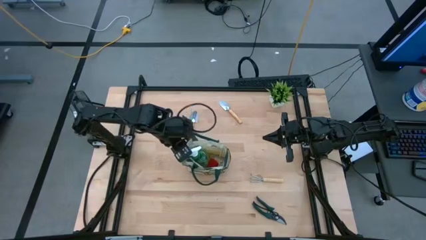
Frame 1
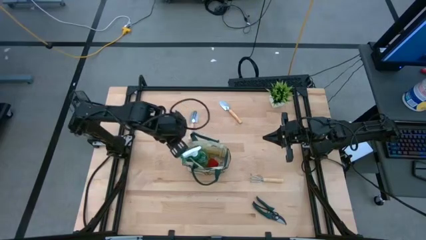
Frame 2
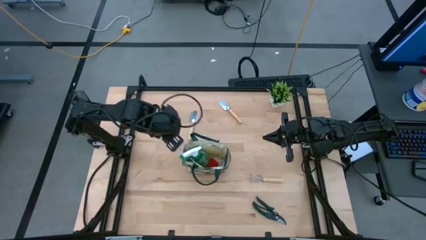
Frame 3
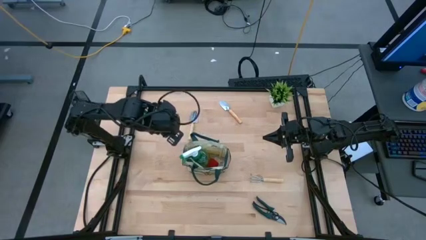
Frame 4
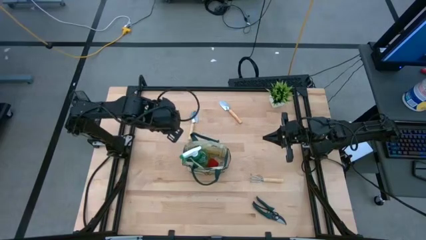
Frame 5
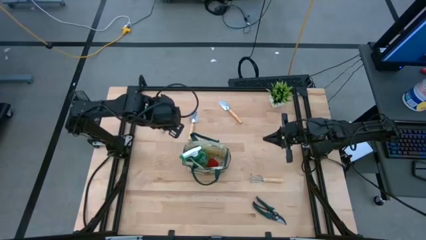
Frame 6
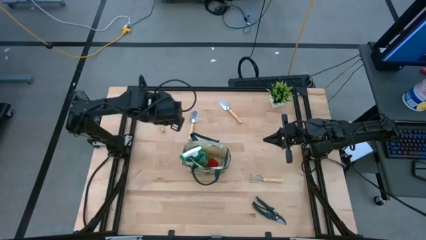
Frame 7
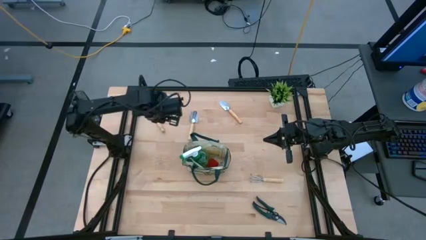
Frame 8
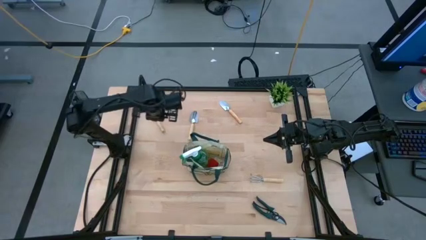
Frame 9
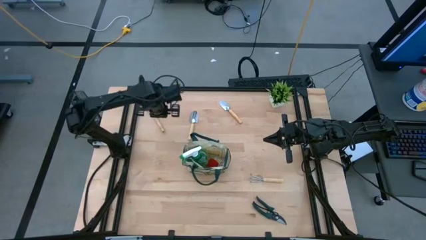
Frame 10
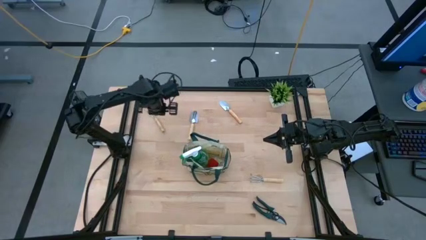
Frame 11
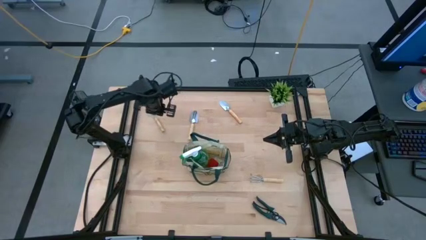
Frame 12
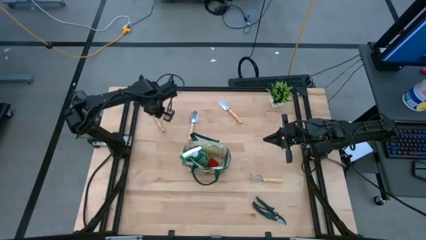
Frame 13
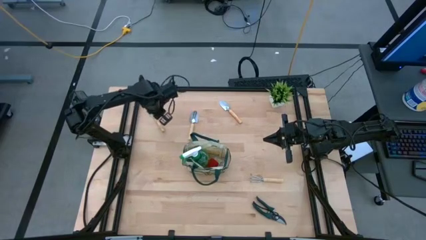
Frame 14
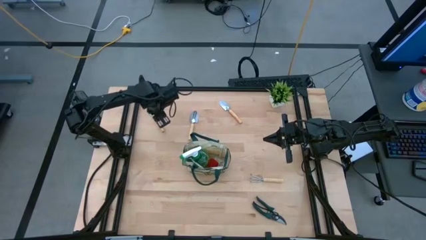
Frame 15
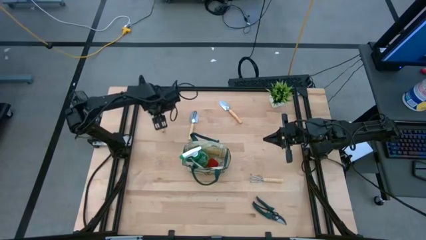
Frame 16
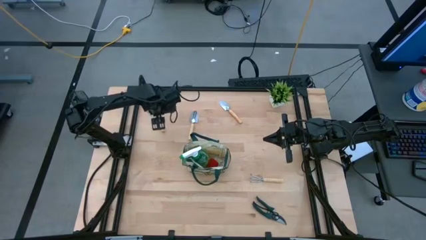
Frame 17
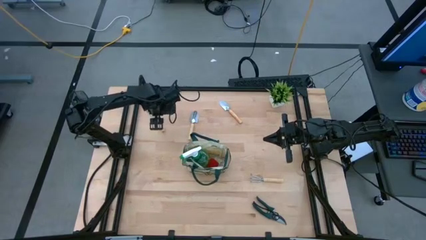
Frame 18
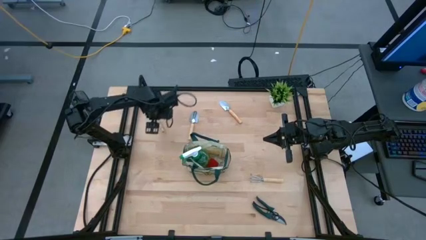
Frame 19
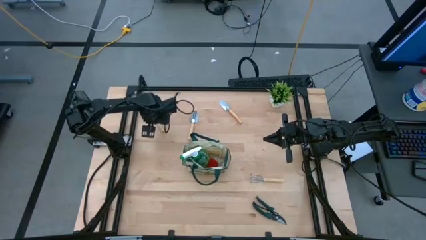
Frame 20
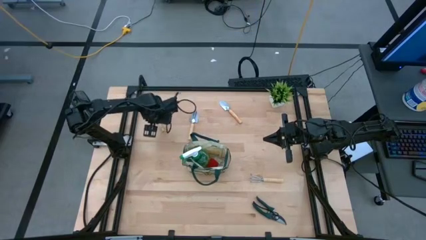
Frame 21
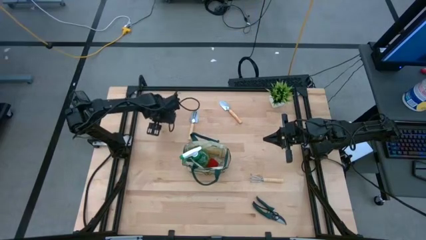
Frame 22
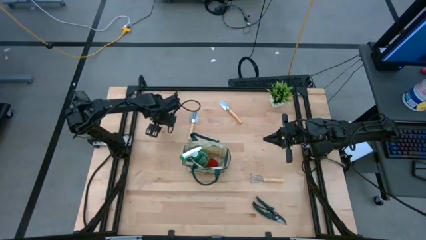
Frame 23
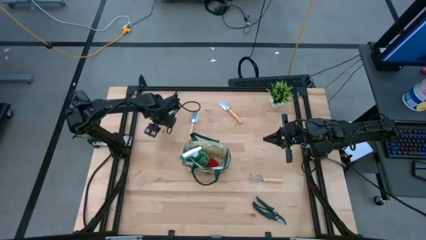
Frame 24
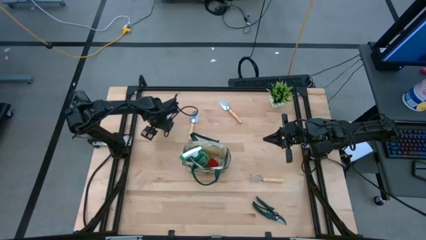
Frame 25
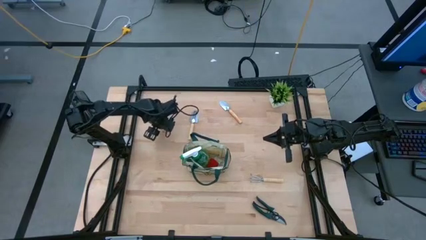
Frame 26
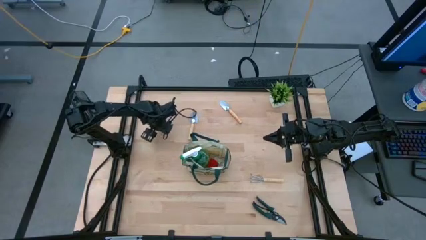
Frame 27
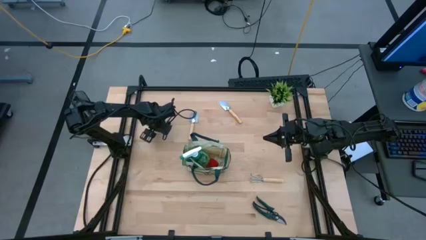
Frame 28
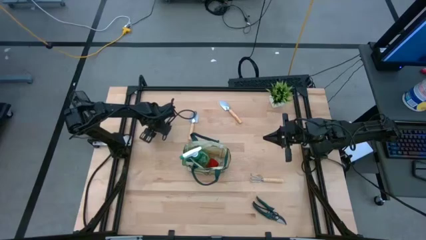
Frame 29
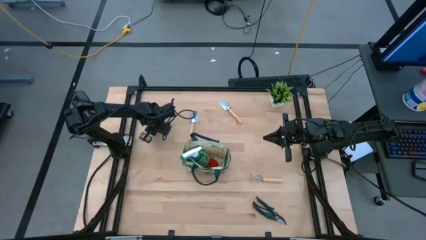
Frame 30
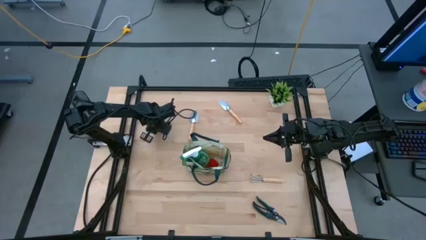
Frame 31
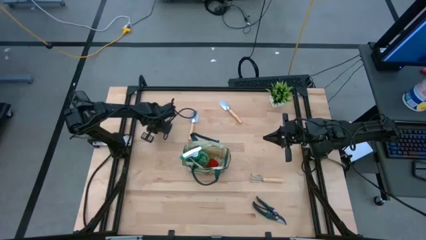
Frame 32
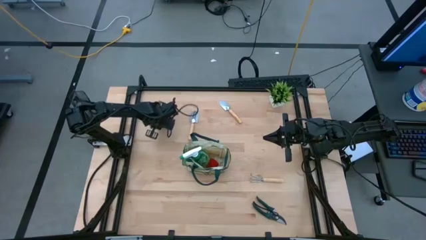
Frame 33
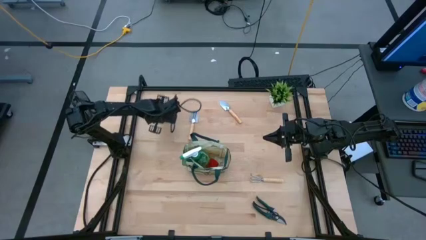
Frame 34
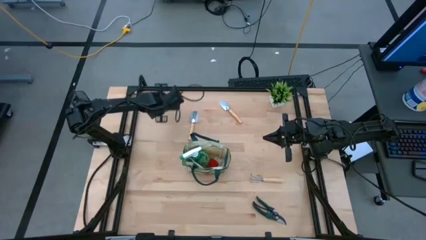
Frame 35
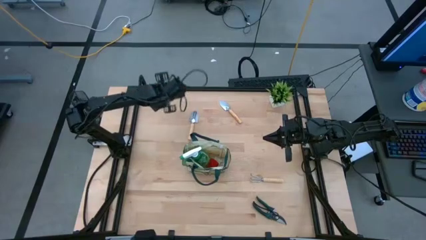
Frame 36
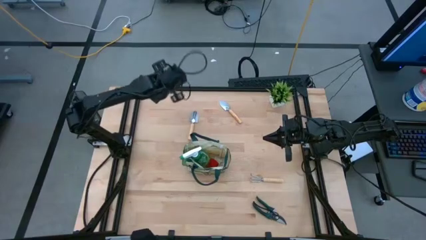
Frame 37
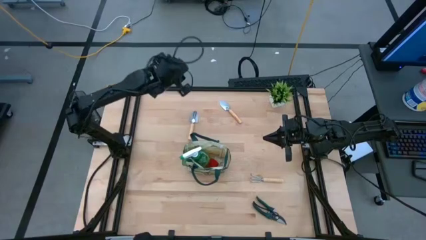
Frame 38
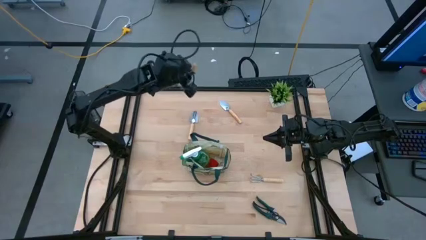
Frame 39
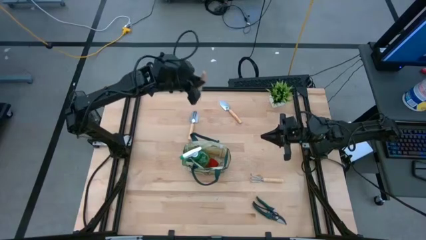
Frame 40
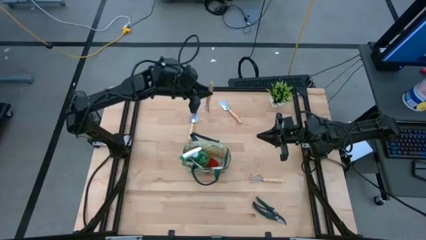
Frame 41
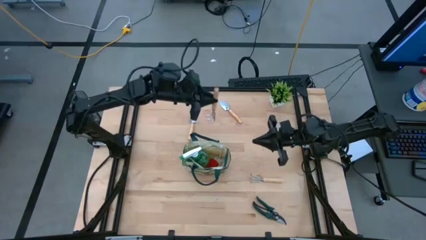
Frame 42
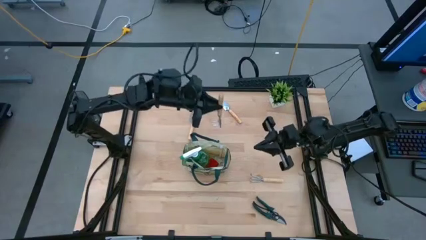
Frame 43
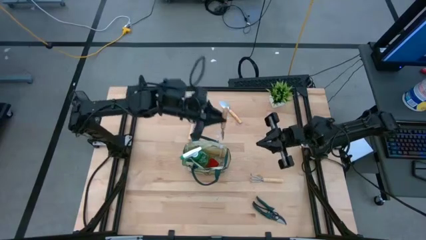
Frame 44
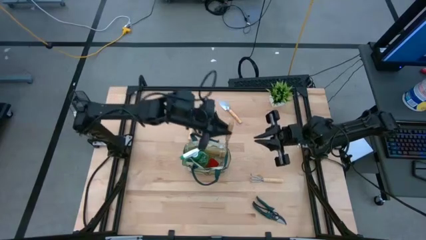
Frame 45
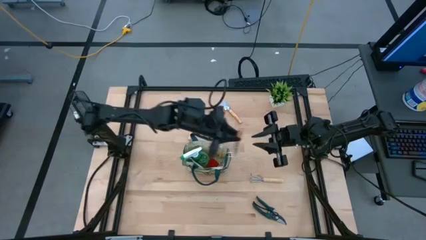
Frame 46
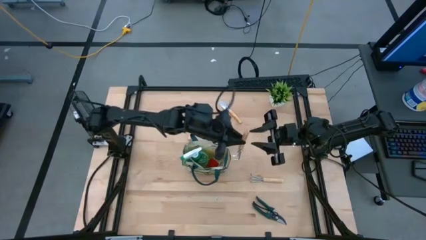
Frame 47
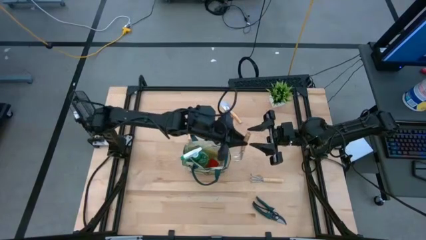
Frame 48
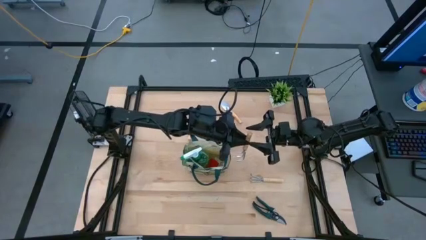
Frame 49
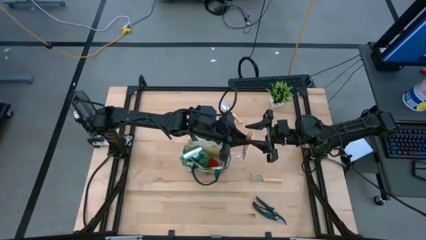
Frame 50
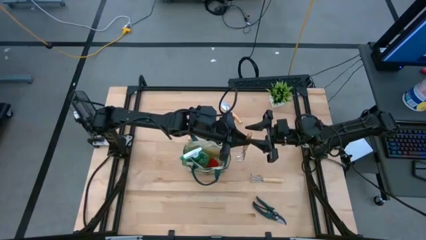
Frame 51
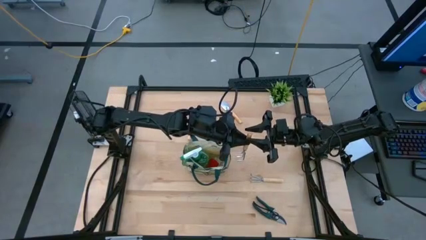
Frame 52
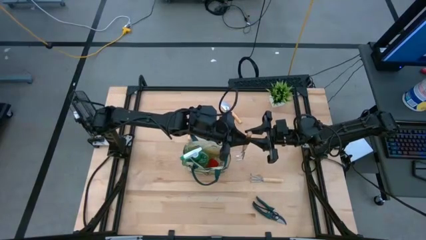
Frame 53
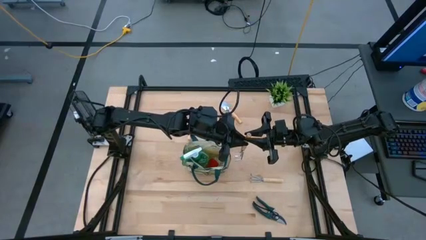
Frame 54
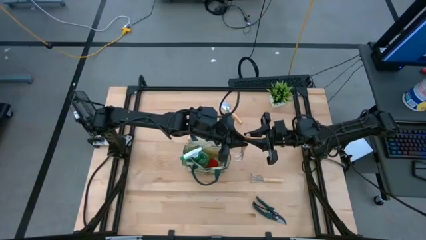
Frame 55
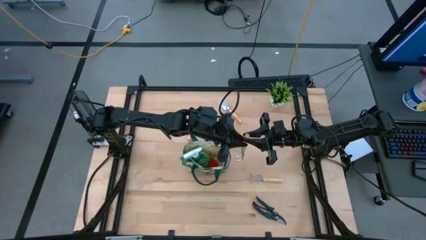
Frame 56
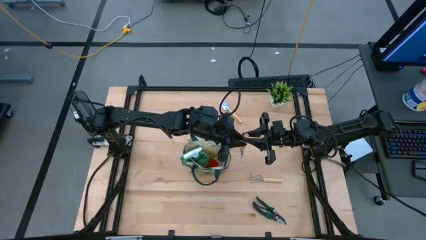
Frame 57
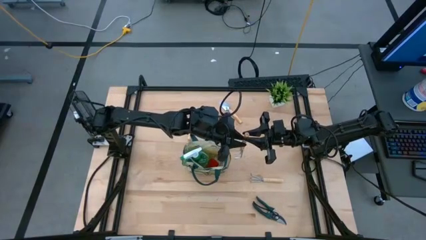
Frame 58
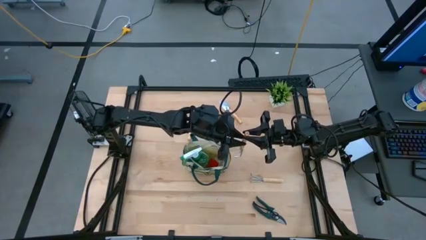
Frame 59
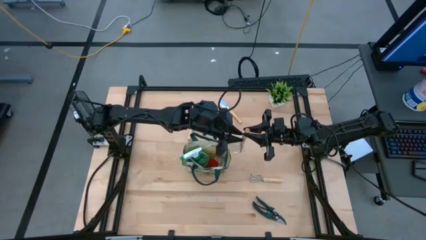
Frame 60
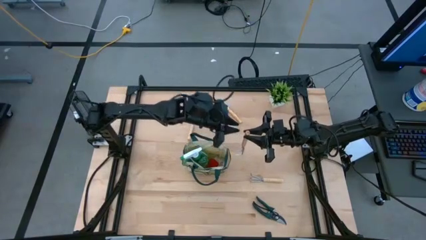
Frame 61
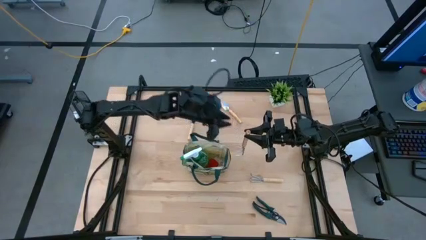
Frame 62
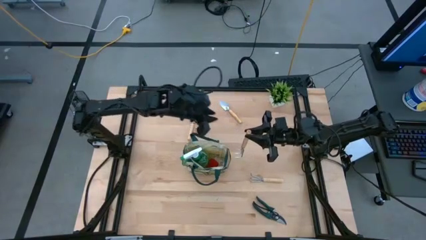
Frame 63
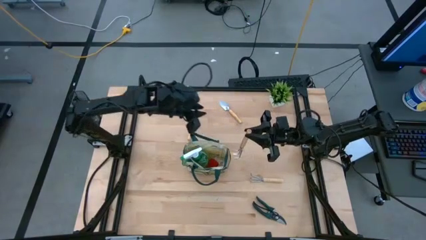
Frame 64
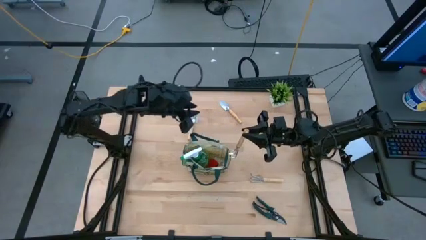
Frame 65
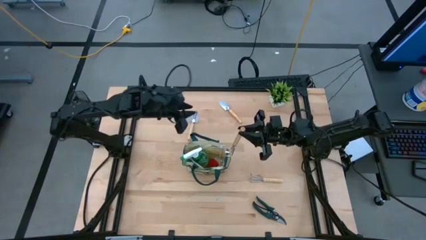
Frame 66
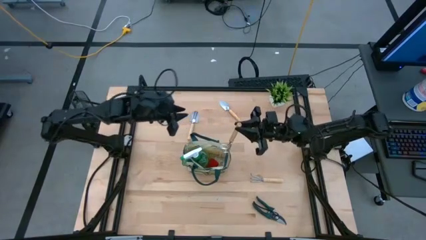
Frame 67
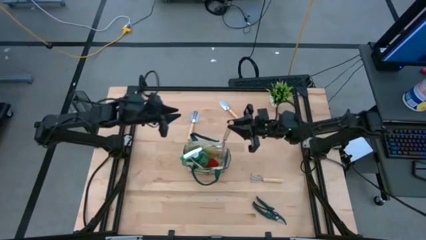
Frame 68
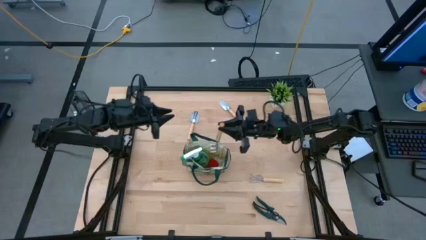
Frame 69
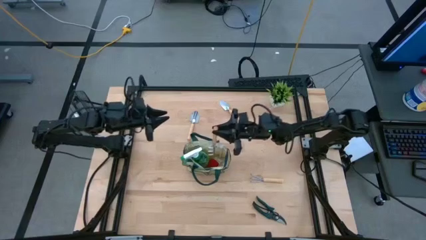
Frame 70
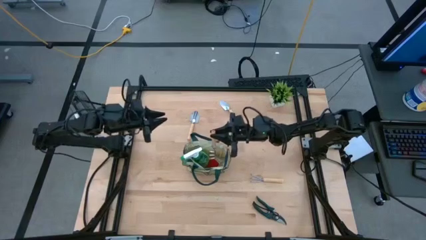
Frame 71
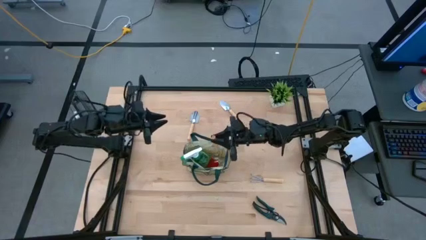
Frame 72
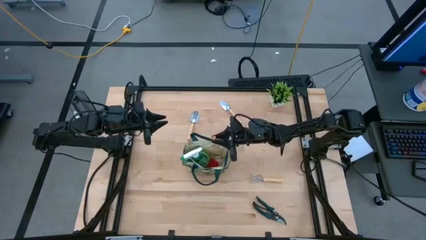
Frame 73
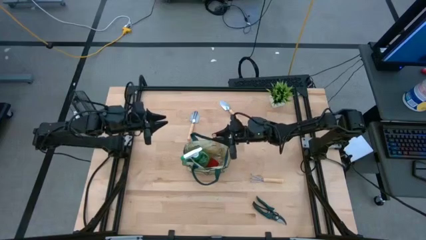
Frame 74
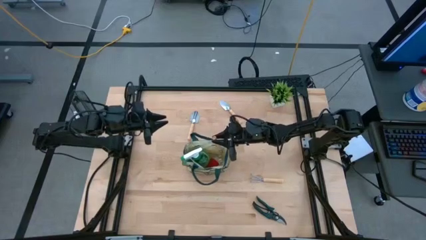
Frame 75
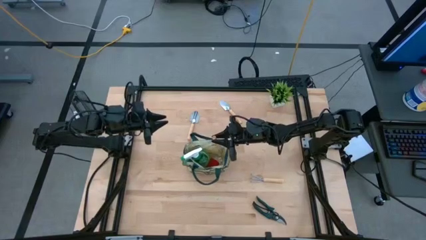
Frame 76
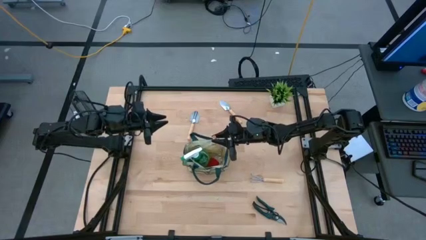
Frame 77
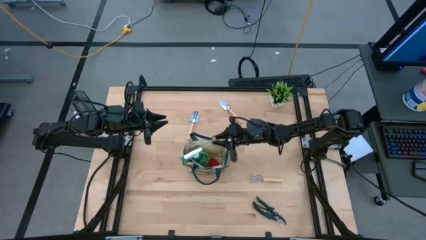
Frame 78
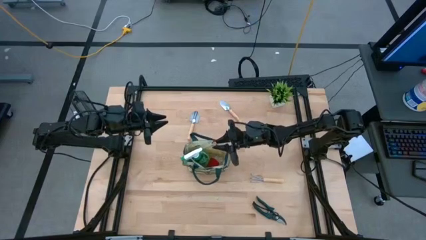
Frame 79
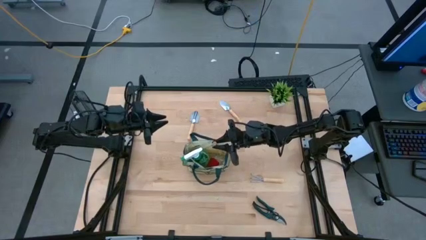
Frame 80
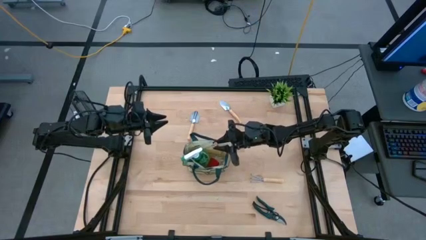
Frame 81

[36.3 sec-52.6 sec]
Task: Pick & Place Garden tools in Gardening bag
Put the top brown hand rake into the white gardening bag
